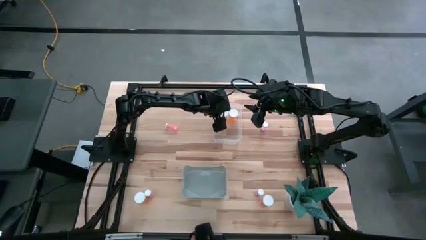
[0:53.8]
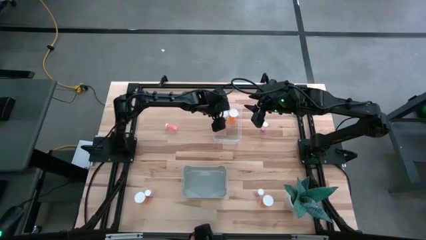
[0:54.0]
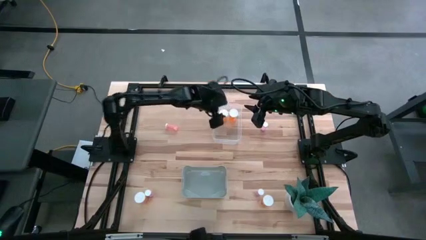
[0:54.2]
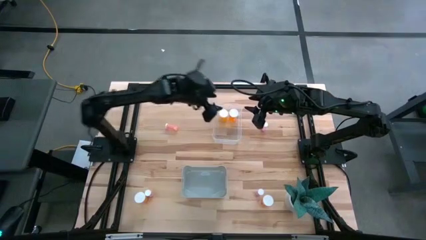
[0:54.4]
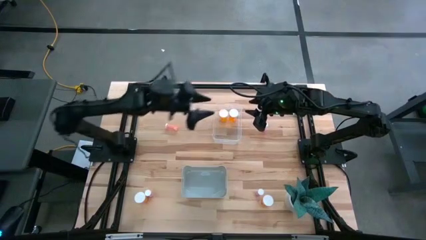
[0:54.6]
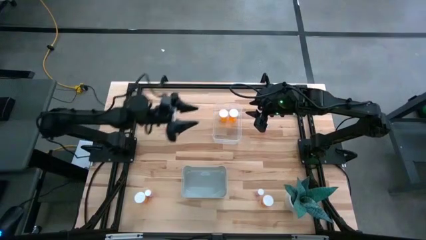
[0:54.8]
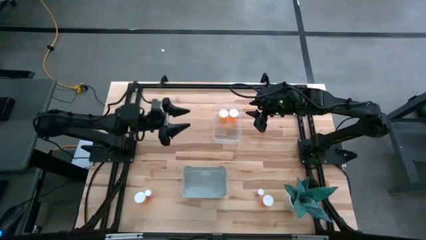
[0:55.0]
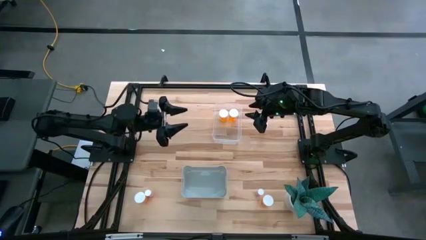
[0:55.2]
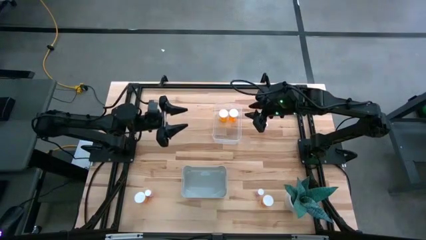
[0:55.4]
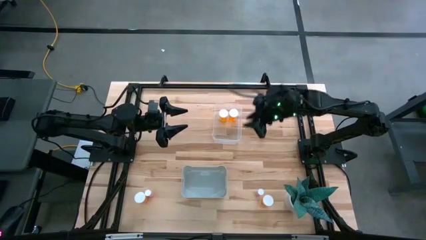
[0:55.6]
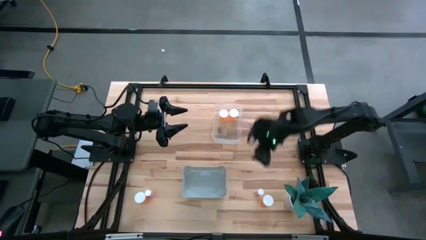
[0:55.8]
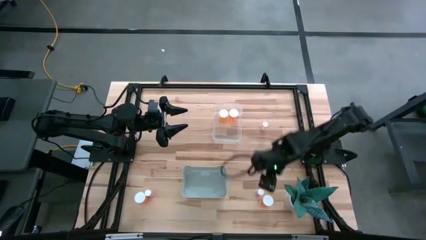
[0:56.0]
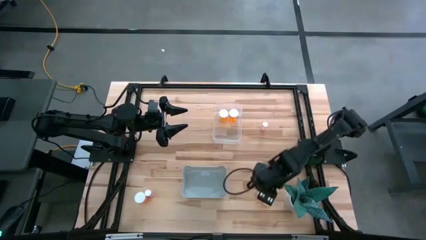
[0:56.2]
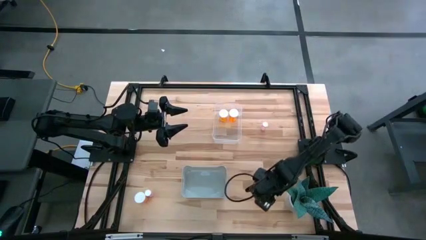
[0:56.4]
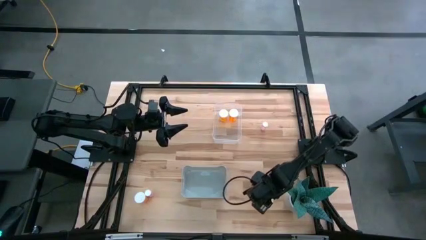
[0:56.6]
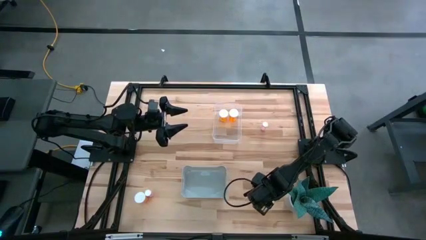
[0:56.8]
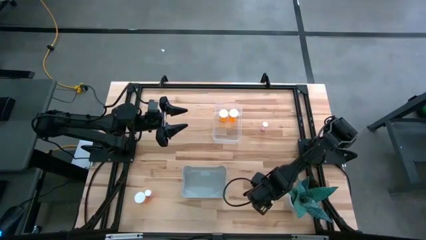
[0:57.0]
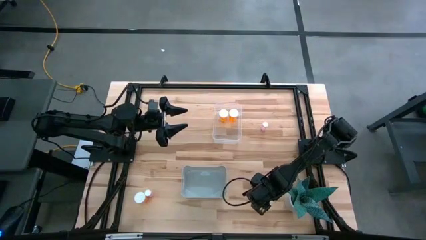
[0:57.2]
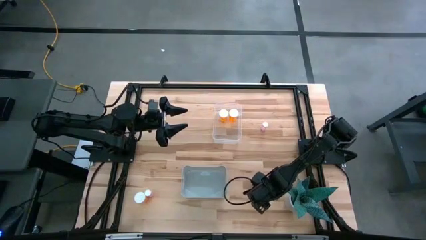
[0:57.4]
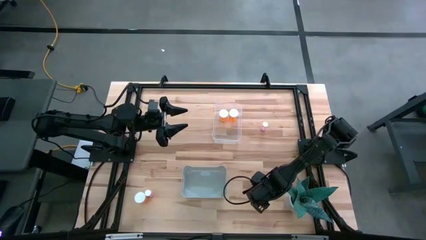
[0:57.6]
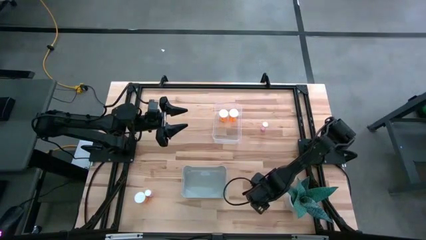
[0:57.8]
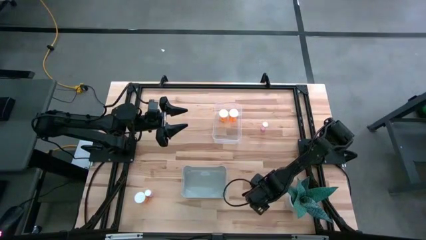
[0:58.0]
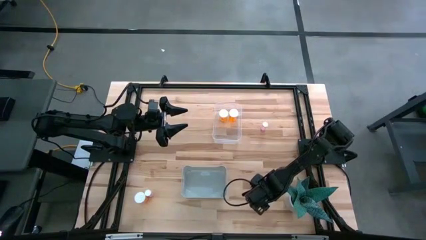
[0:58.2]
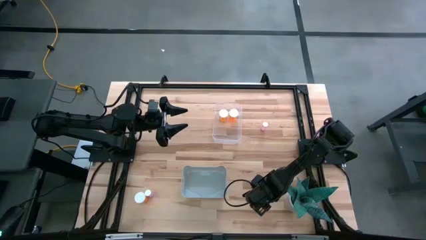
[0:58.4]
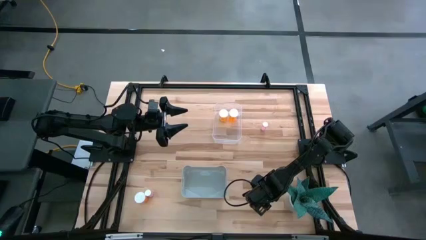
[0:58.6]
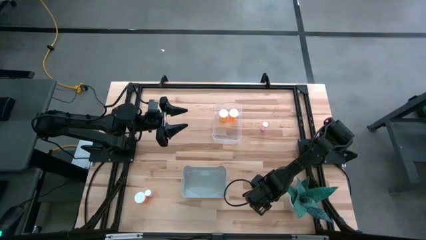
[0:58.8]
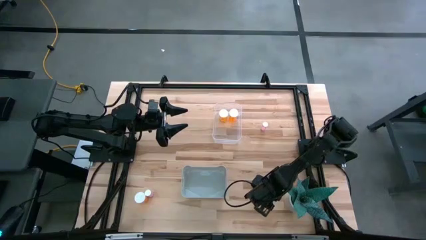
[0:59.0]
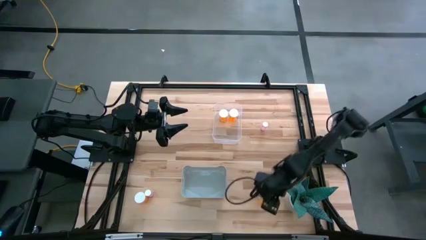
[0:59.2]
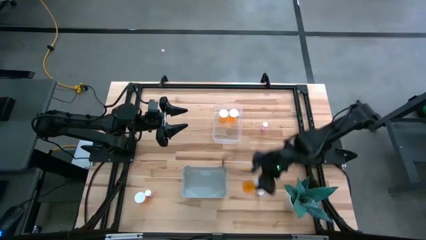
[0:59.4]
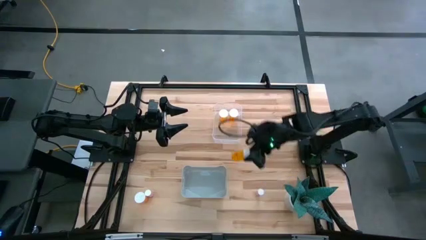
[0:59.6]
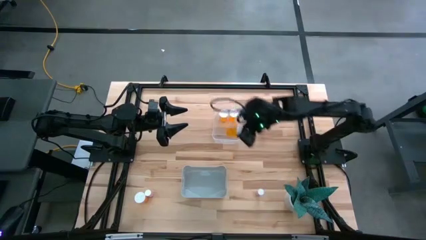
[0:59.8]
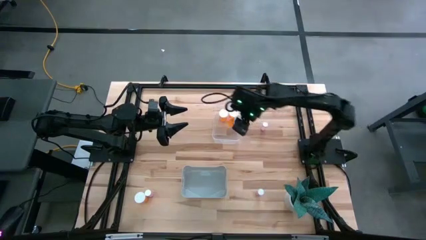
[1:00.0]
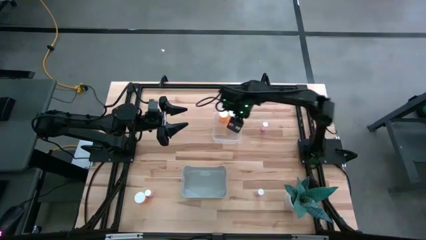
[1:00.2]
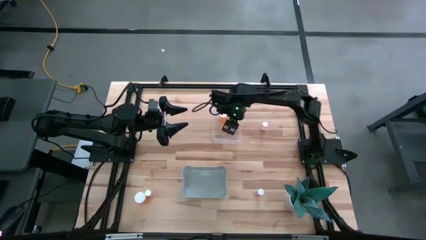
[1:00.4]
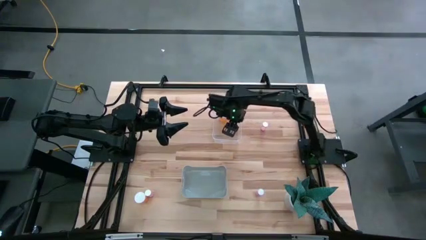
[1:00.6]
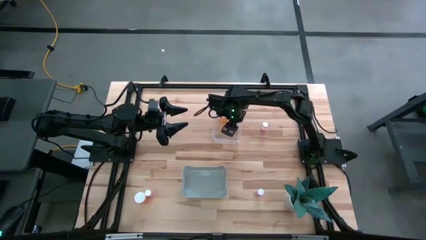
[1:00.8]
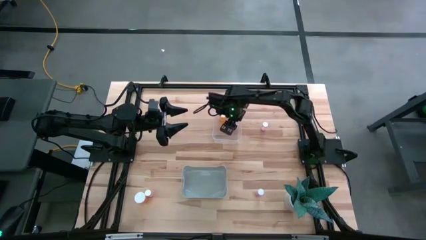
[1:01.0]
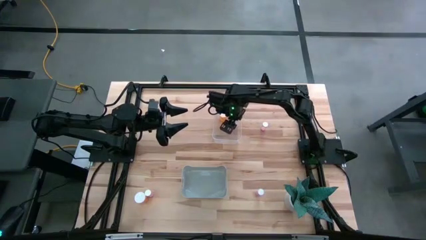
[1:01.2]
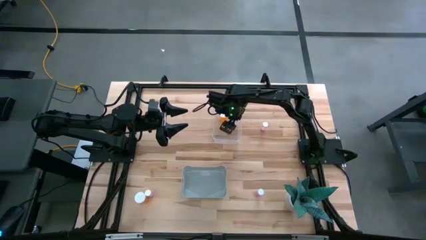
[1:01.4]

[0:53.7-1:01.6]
Task: Pick and place medicine bottles into bin by pill shape (circle, oval)
Put the bottom right orange pill bottle into the transparent bin

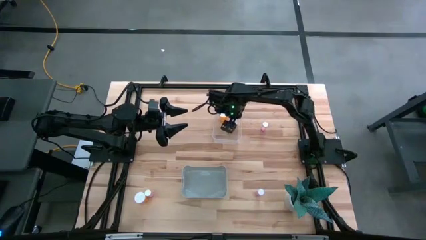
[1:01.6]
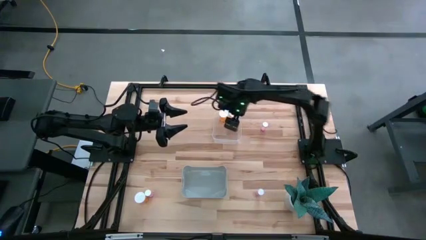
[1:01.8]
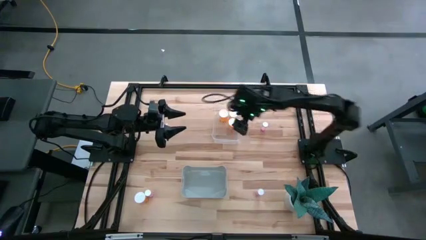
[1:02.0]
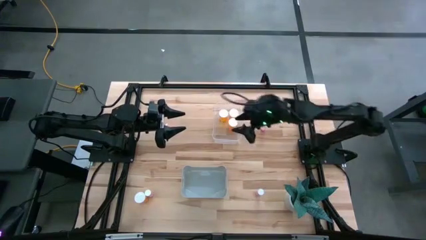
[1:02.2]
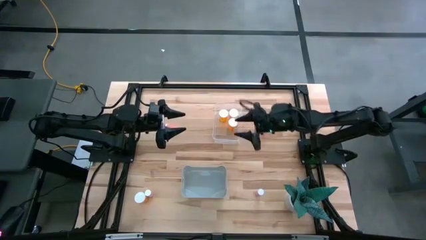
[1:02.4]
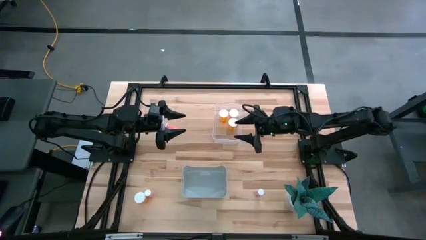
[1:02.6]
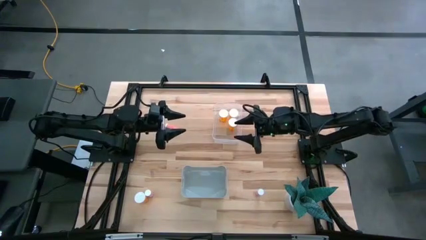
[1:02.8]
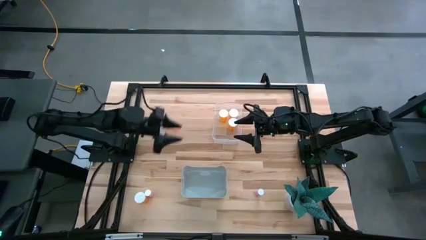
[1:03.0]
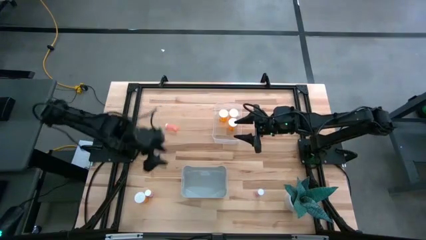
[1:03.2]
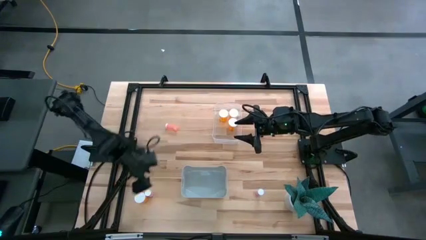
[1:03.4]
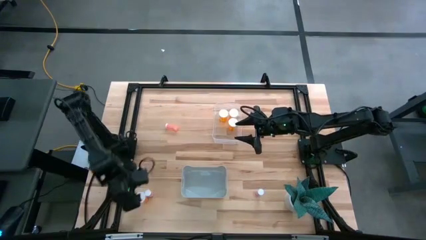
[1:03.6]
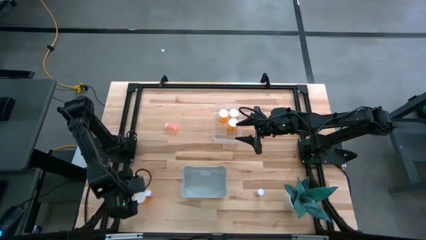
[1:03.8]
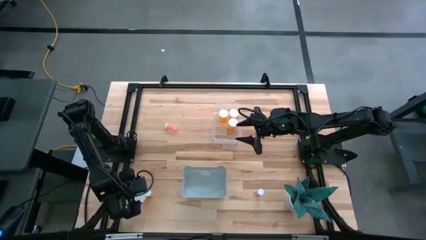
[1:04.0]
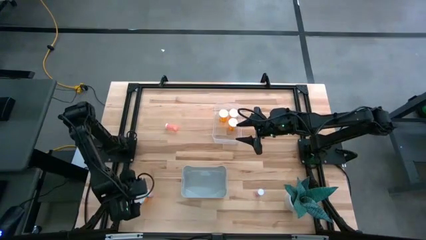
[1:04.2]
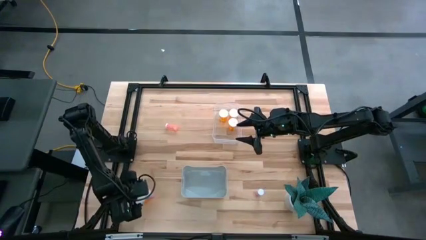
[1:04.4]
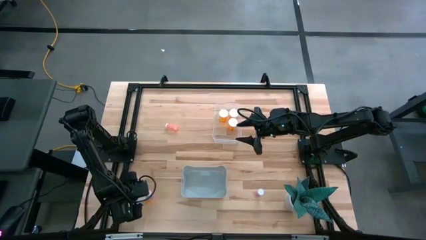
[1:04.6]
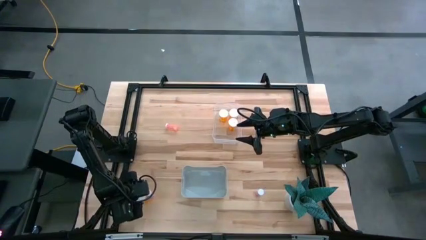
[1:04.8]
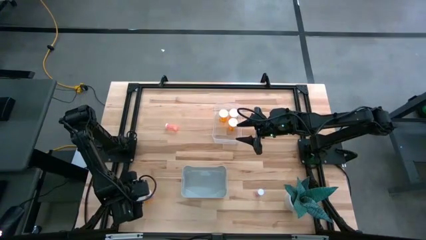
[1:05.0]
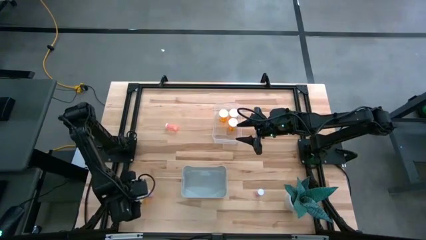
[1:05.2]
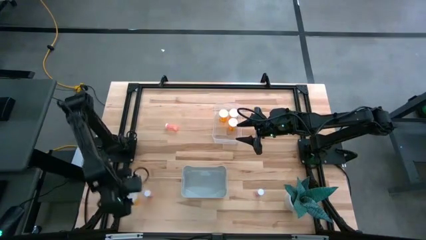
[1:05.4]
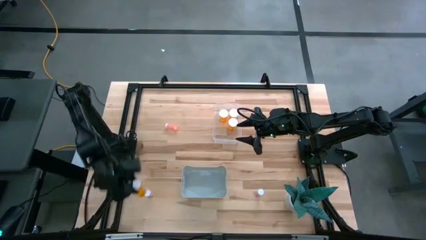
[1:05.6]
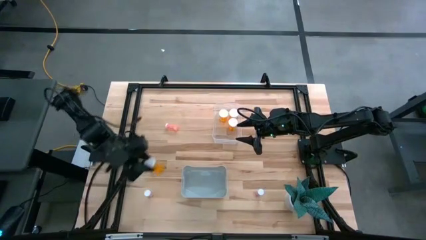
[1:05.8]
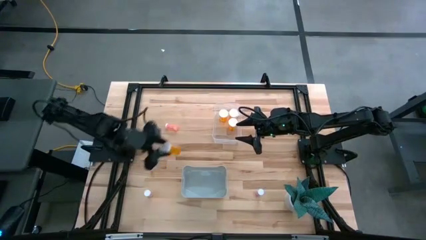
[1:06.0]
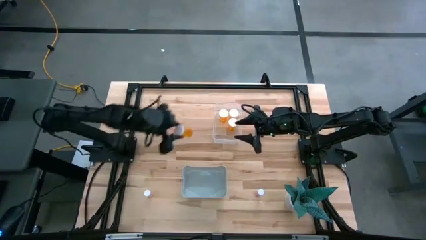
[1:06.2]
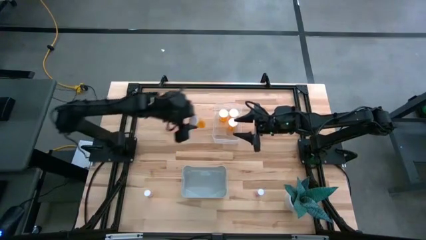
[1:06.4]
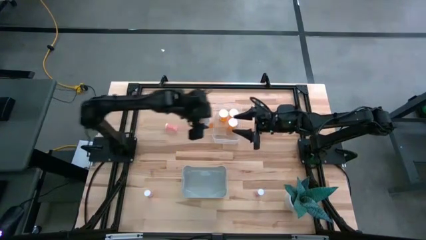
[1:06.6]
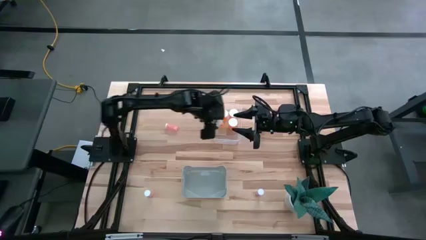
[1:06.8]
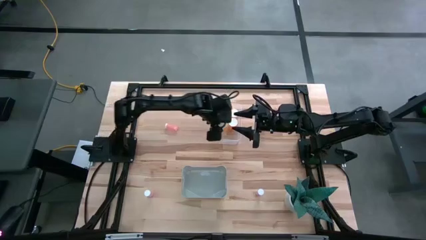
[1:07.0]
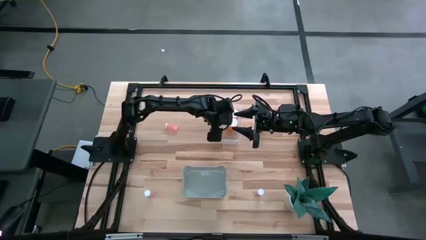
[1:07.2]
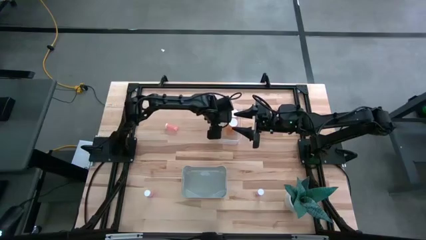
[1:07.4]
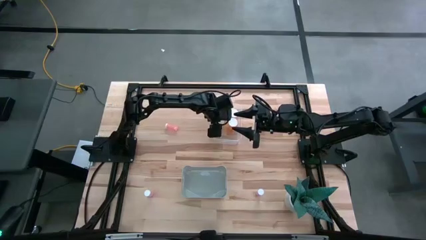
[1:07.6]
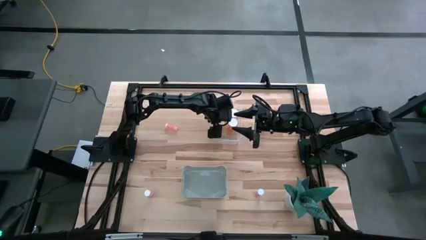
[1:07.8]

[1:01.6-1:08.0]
Put the orange pill bottle into the transparent bin
